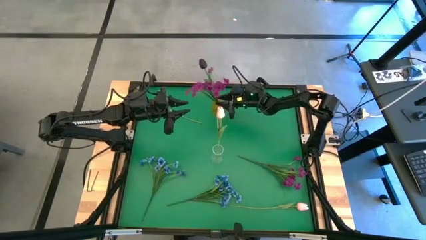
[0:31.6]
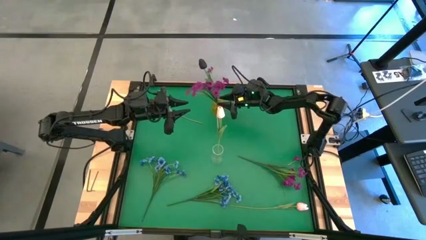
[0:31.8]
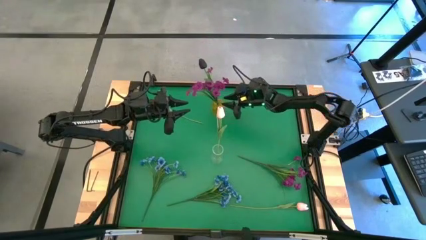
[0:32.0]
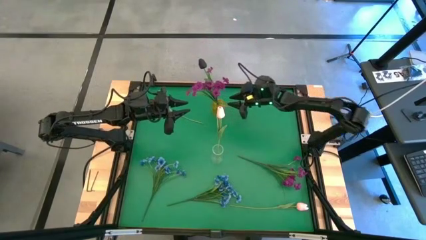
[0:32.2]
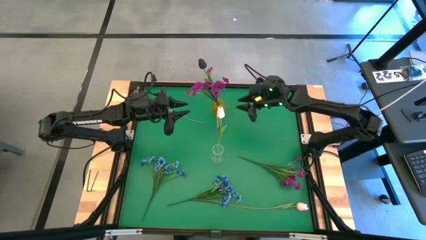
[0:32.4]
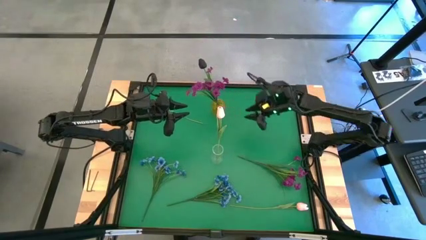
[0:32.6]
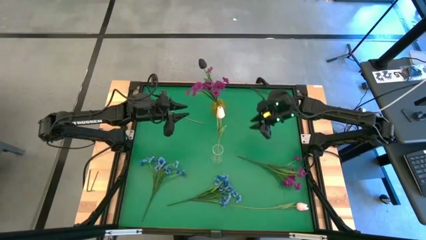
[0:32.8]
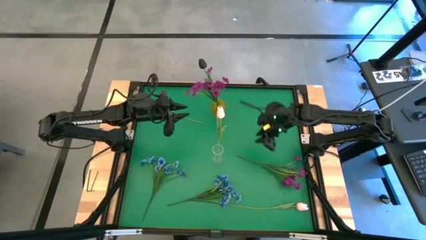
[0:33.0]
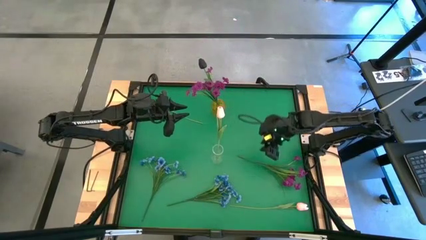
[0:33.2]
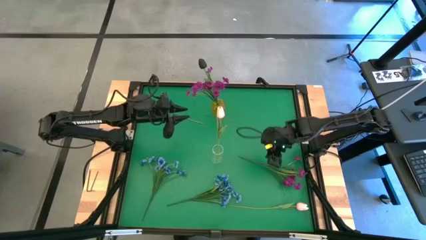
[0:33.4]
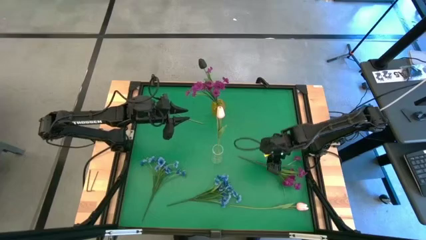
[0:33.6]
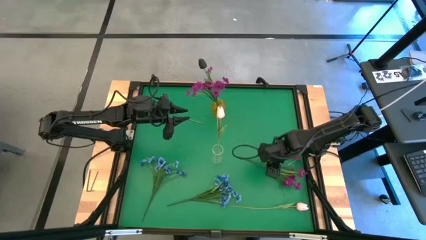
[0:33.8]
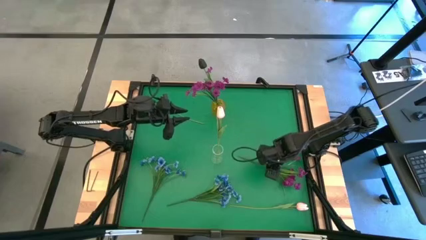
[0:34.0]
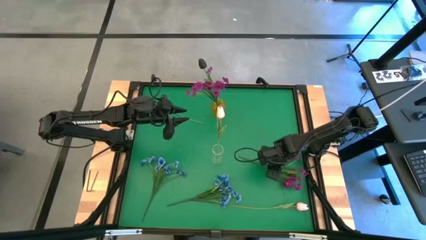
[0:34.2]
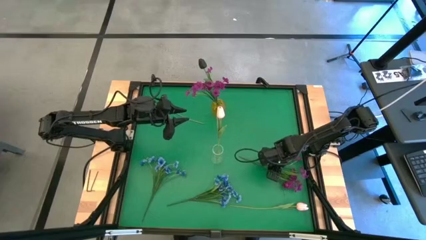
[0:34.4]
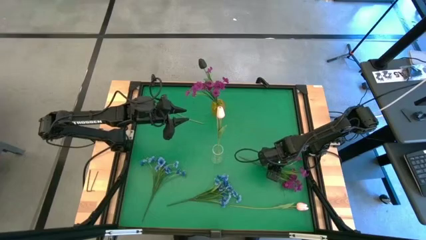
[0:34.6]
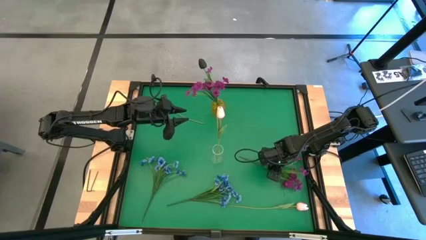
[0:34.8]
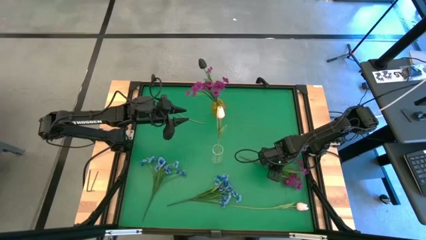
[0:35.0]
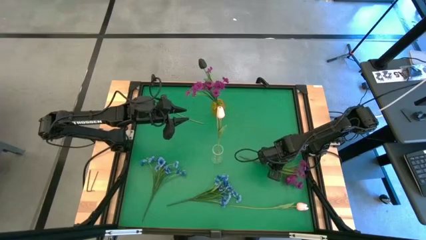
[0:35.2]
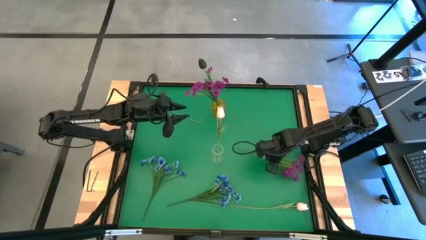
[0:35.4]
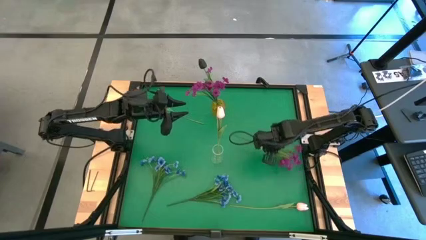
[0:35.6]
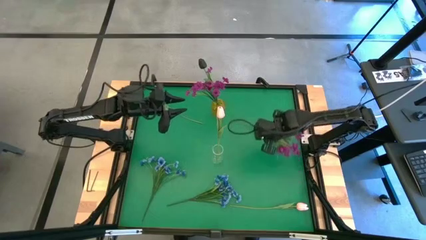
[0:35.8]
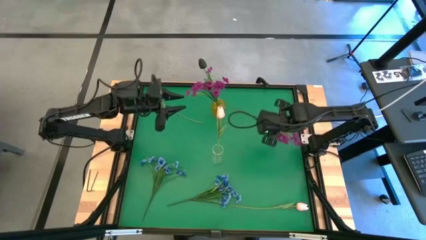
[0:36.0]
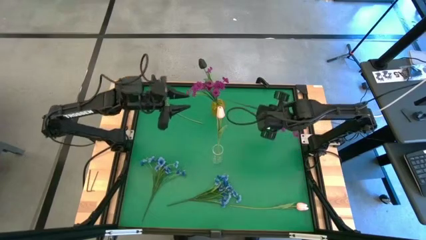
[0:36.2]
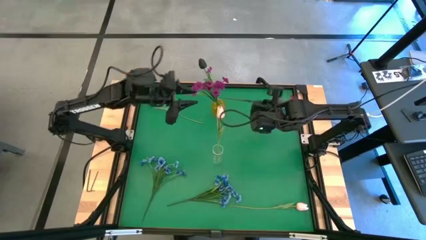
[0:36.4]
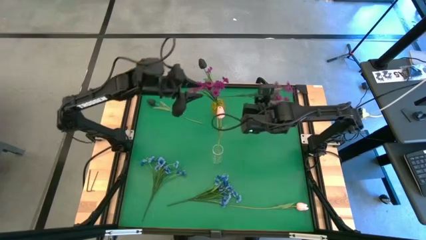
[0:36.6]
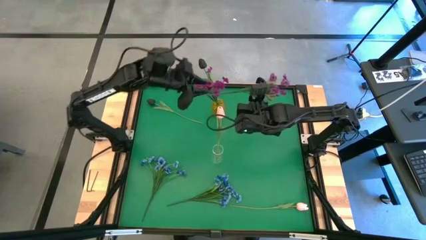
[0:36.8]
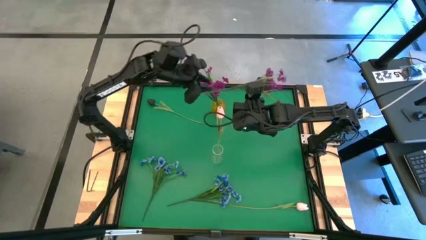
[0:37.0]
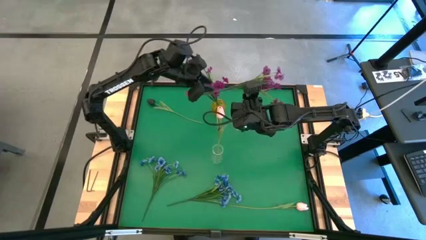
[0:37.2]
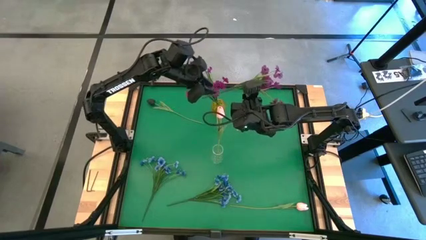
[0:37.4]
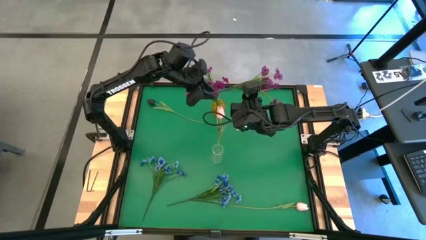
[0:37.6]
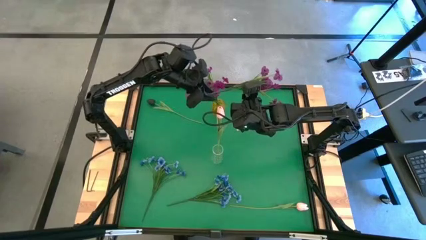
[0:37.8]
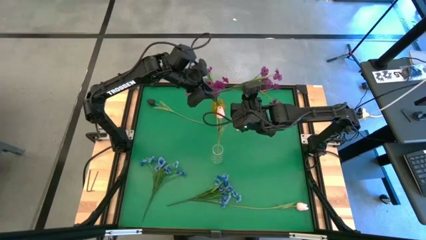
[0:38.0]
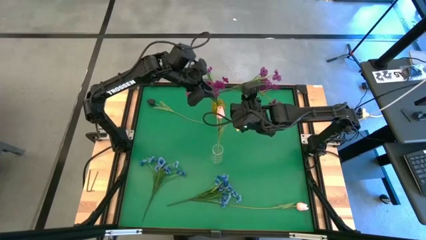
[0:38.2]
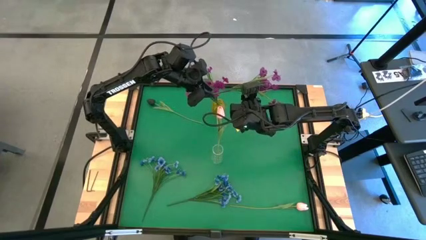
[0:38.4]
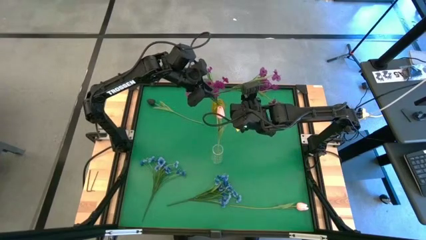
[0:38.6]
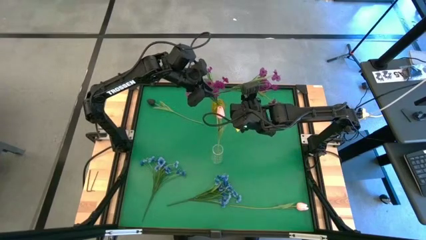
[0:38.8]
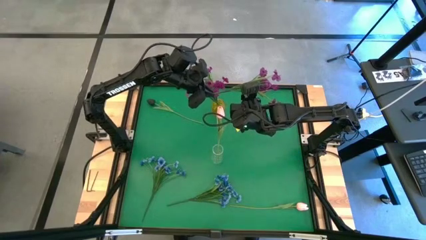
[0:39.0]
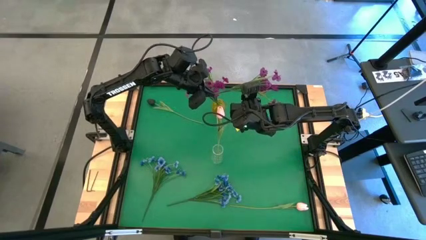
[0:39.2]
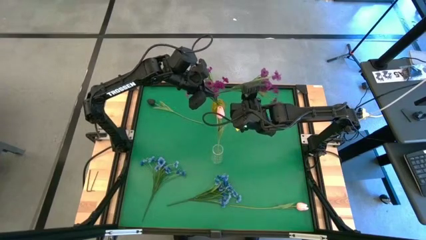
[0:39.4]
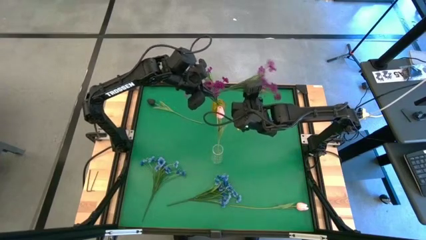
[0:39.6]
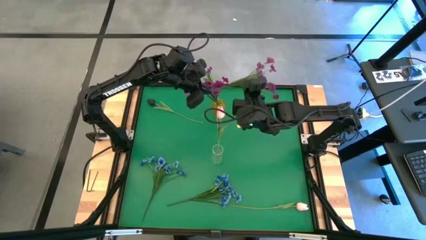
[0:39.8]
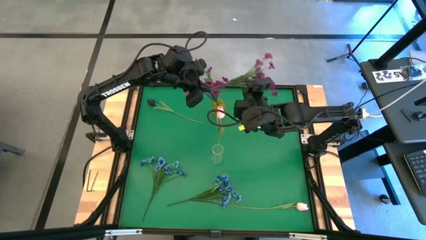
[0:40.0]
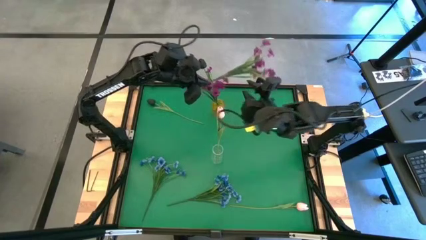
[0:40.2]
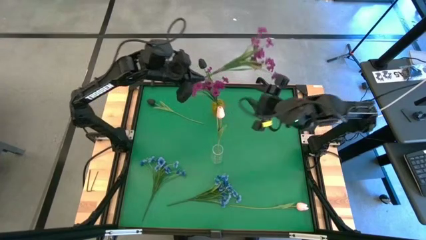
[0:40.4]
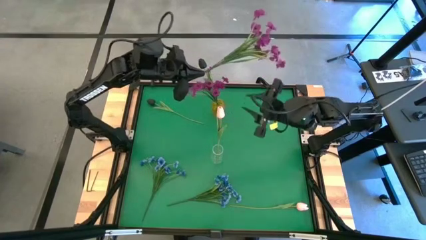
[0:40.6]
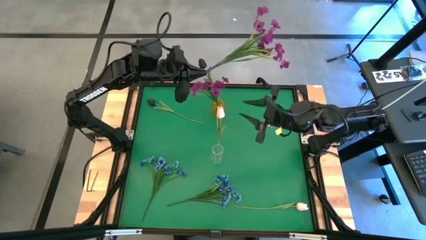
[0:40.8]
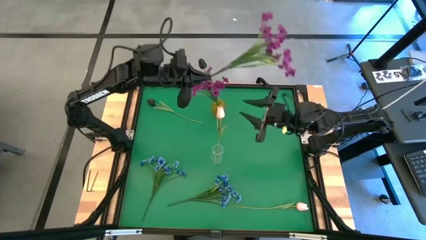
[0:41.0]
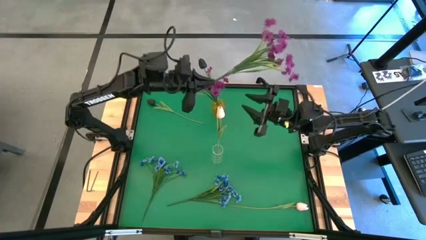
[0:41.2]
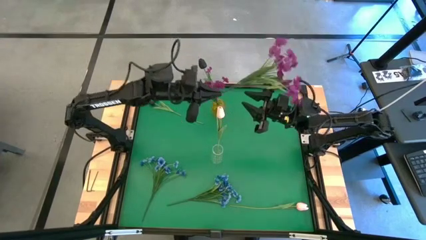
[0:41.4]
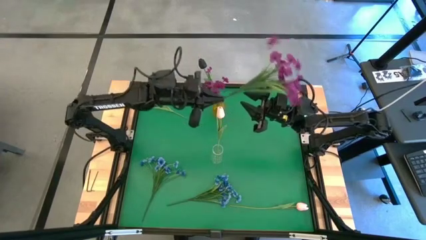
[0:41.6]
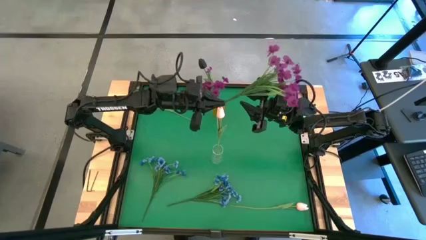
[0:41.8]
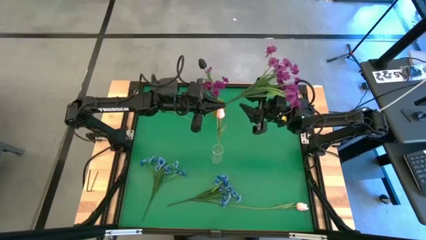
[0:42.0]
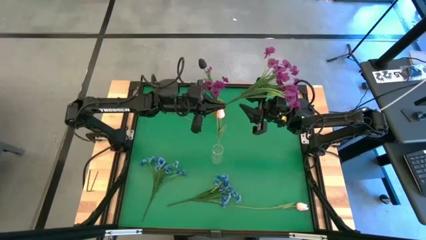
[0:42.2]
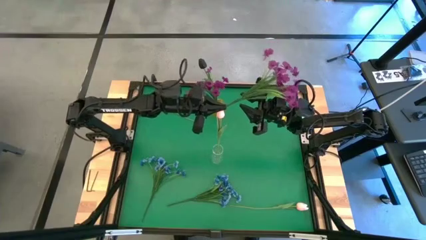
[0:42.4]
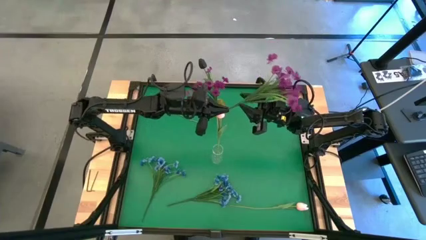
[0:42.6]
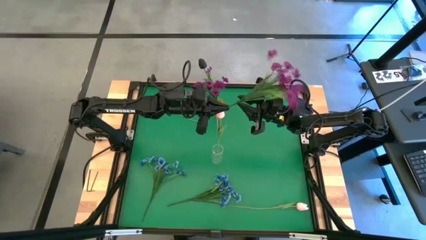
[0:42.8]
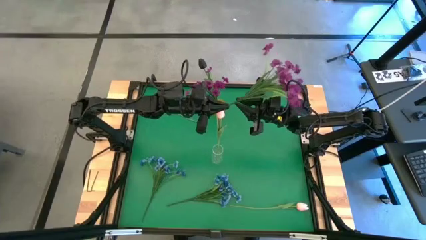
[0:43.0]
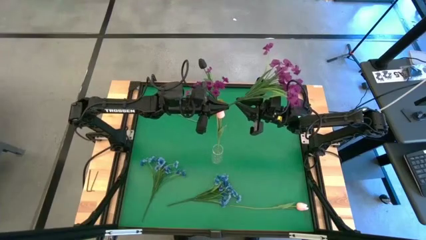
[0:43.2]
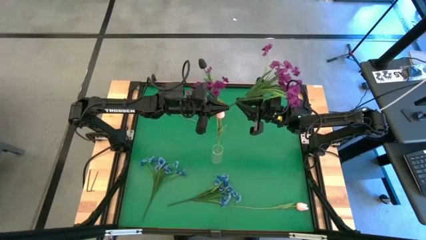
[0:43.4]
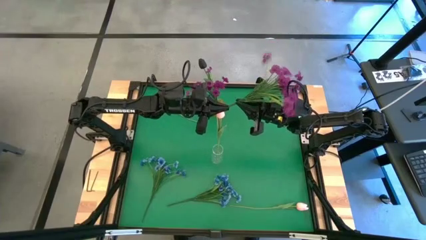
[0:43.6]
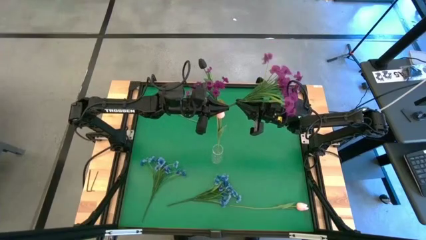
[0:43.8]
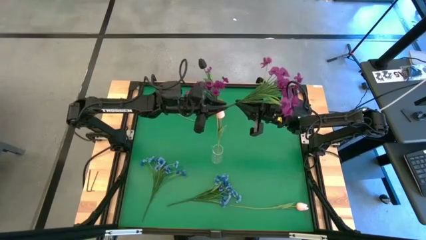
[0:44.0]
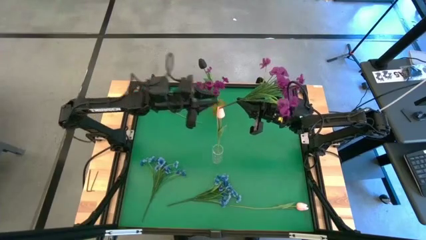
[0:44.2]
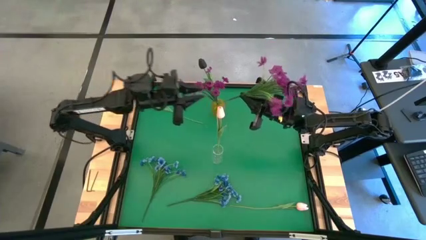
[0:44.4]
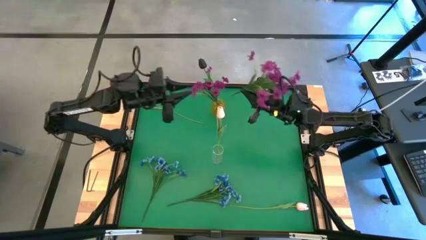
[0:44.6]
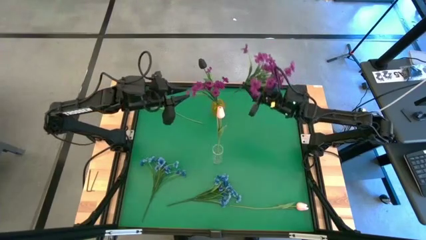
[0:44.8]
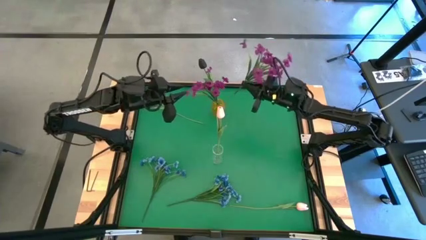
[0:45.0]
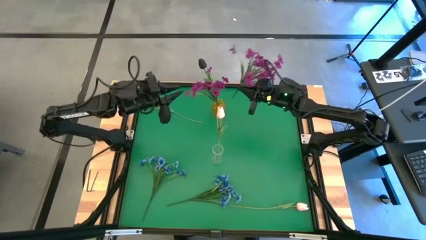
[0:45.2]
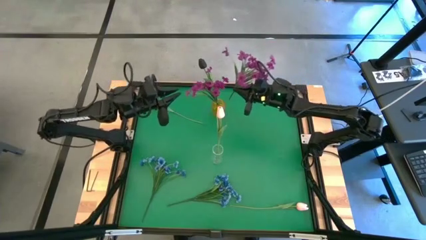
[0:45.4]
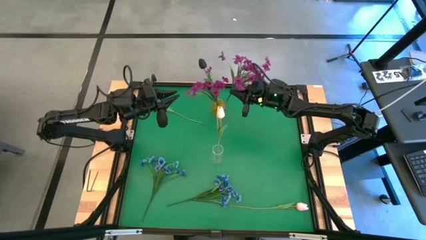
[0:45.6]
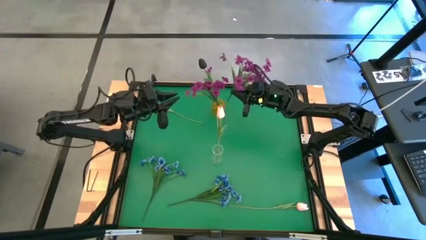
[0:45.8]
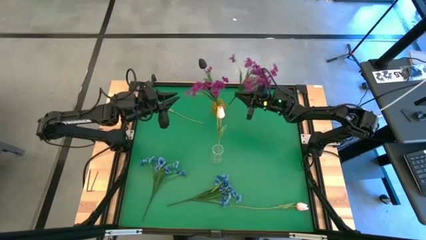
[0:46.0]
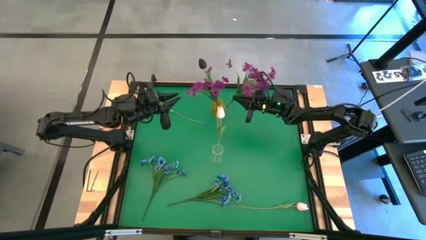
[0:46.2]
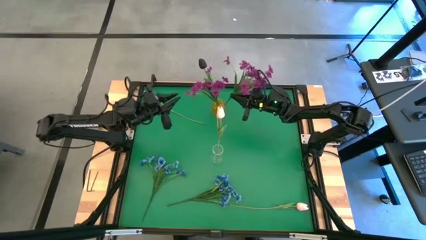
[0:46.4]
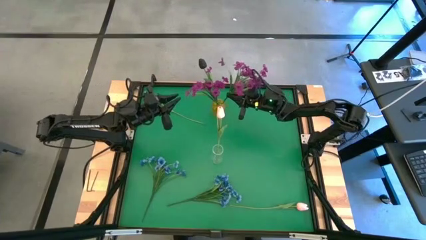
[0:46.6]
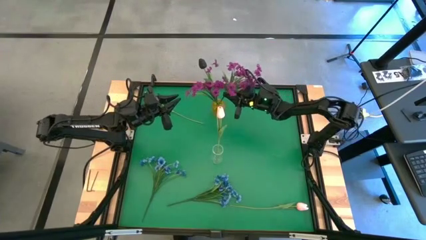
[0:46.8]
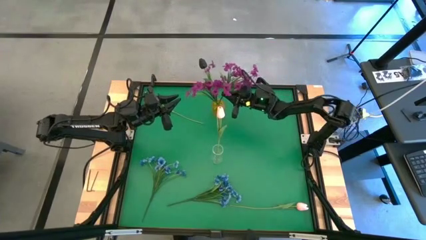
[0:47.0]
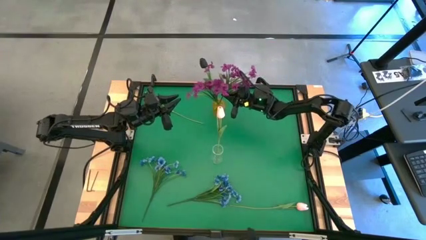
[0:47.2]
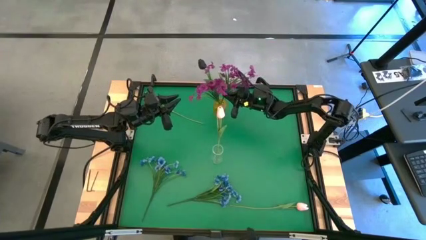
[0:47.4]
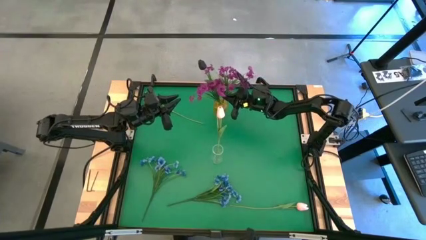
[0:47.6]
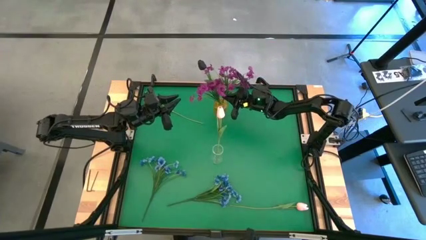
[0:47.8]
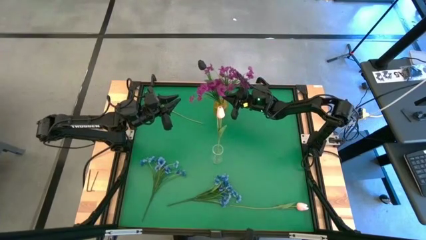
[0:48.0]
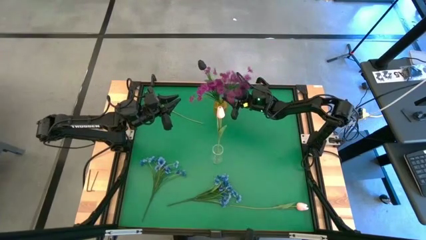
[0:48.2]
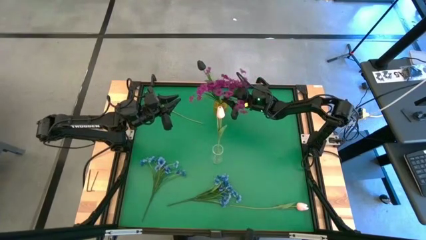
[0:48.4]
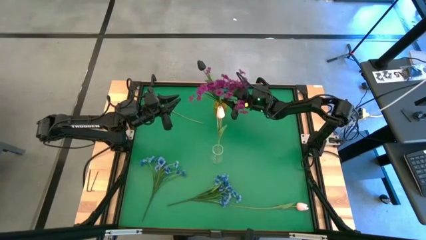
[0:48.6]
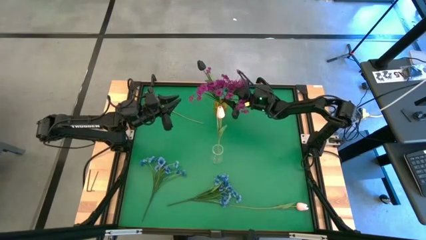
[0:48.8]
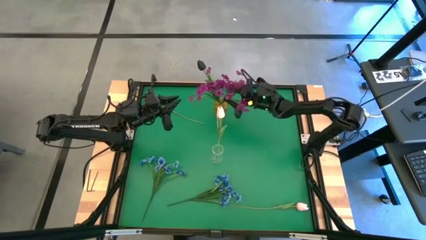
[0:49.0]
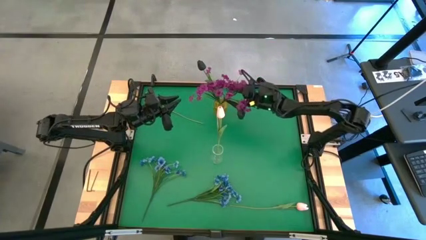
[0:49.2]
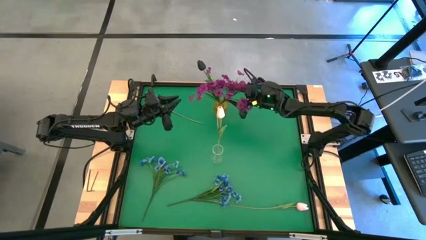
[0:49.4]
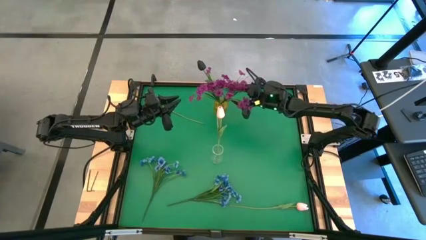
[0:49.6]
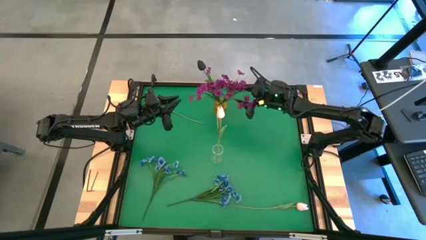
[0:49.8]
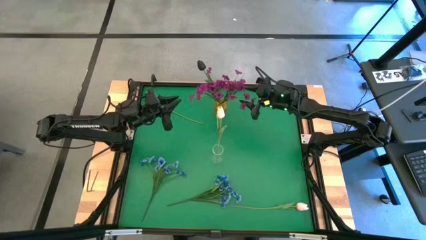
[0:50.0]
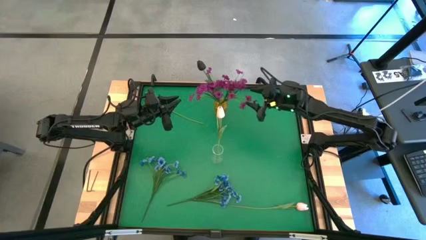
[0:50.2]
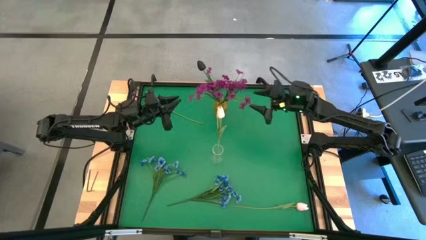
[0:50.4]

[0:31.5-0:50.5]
Task: Sort flowers into vase by color
Put the purple flowers into the yellow vase
